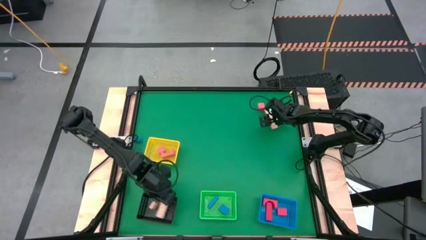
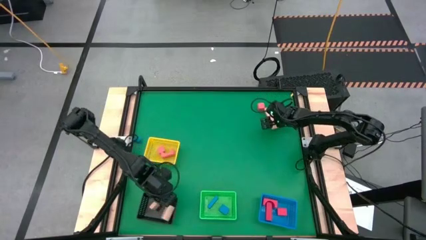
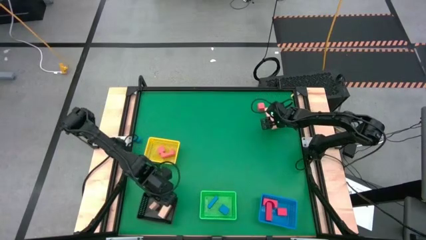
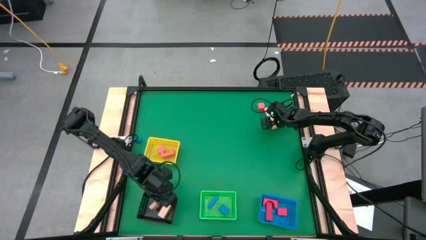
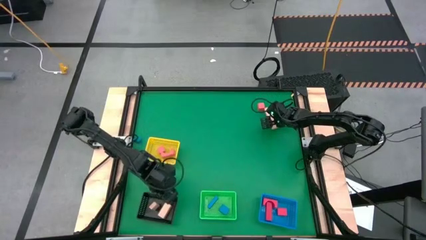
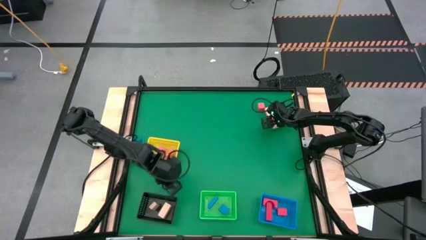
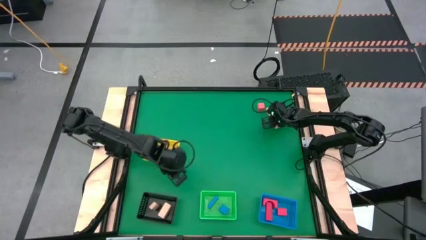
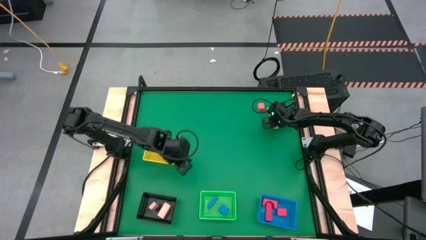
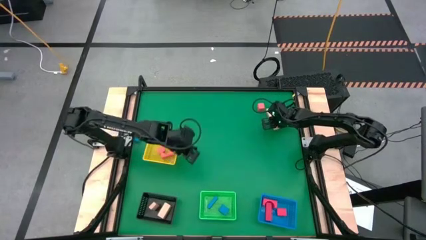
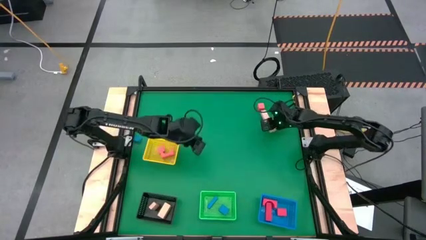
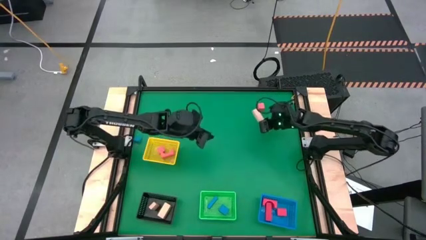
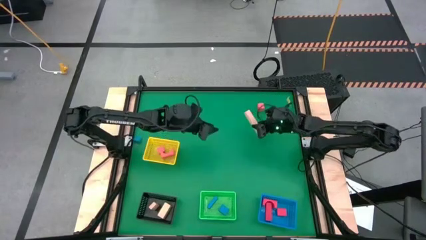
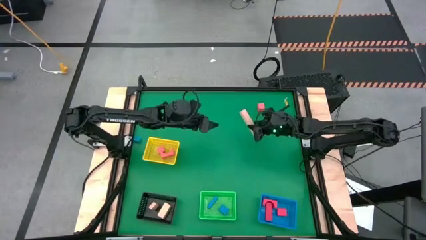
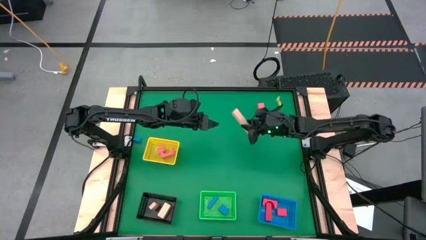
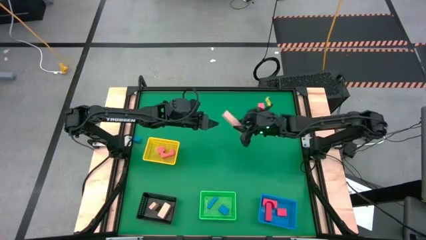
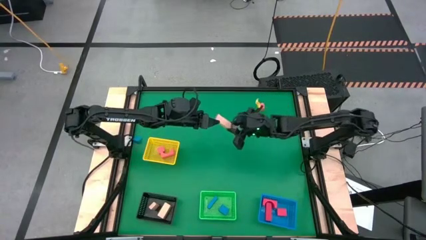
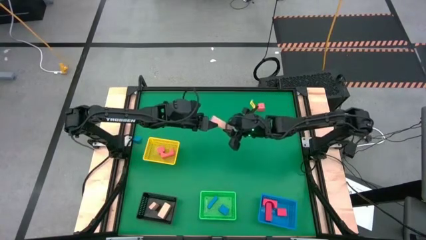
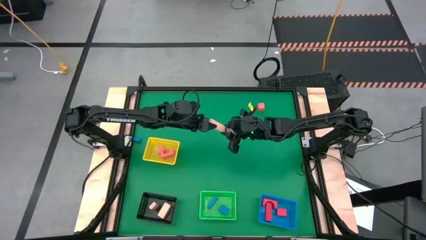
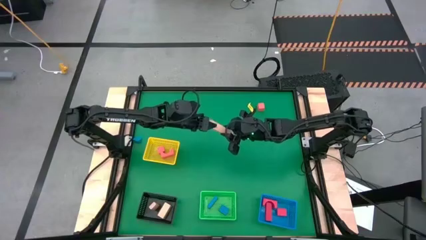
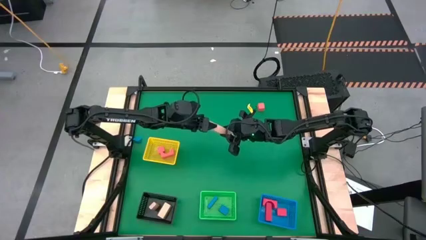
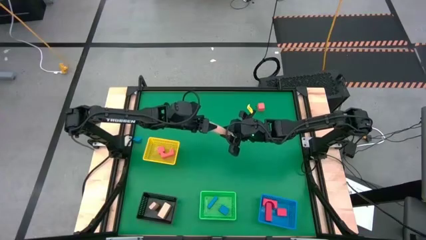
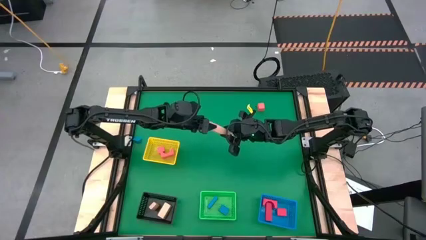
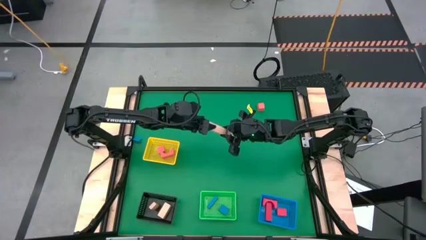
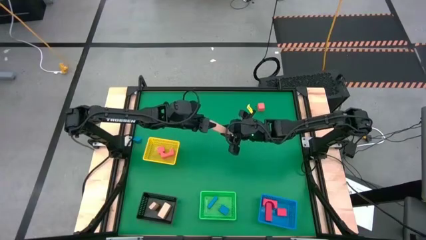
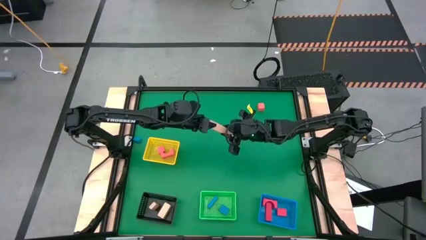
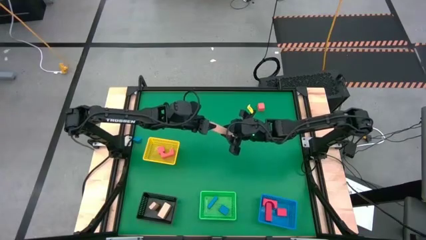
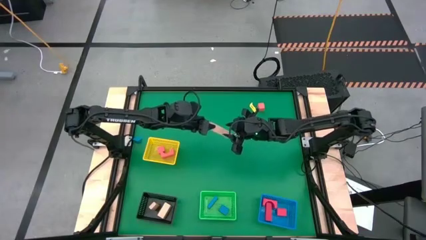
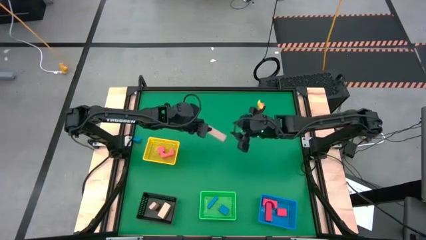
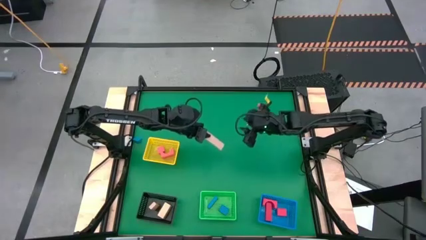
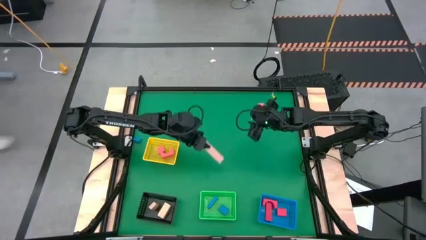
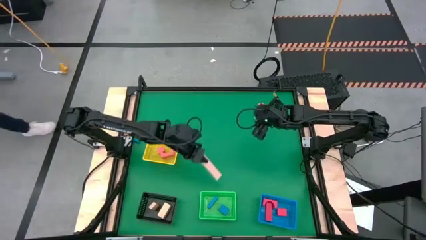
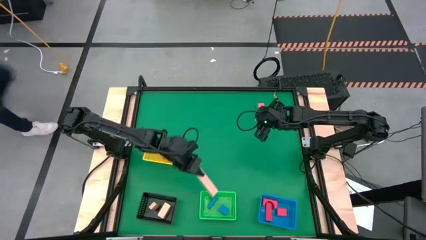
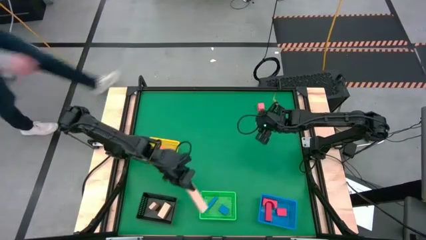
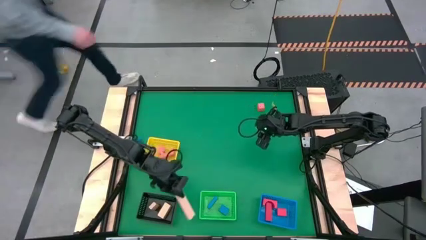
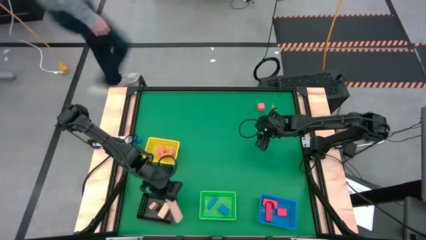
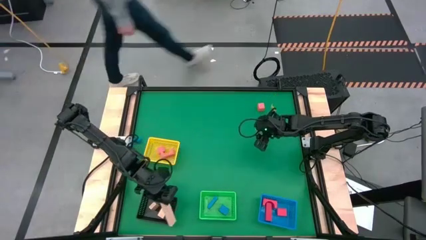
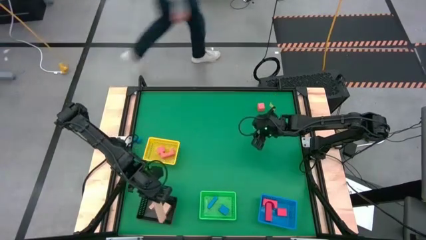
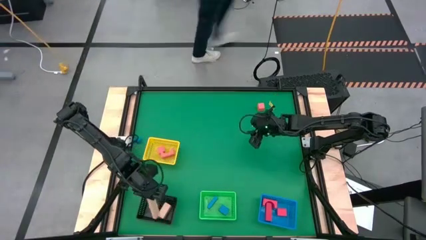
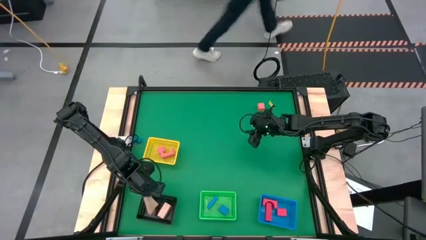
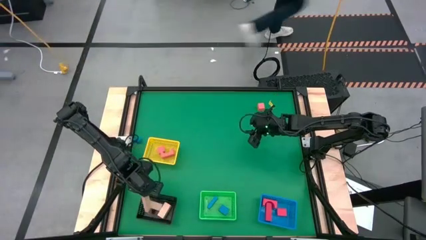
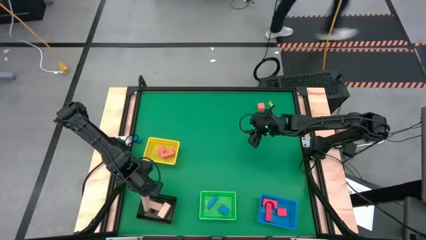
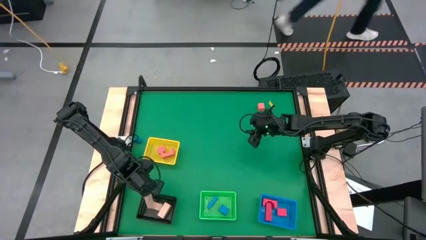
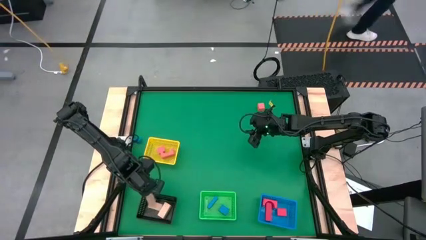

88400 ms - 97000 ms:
Task: Sort & place blocks by color
Put the large white rectangular block into the black bin

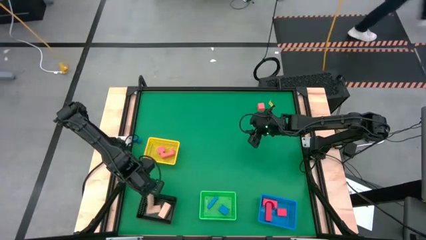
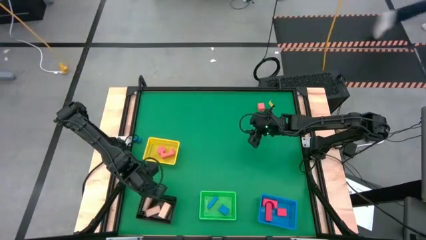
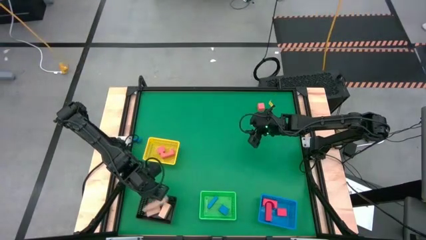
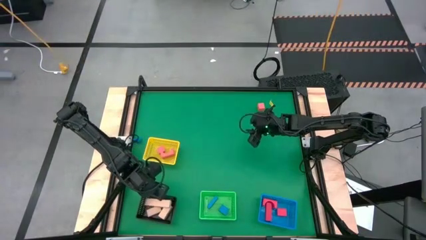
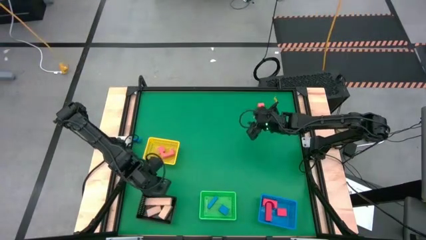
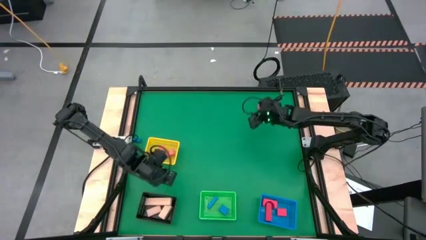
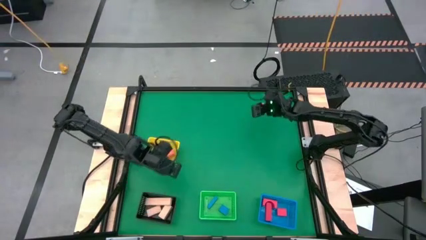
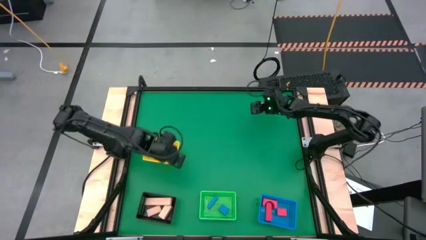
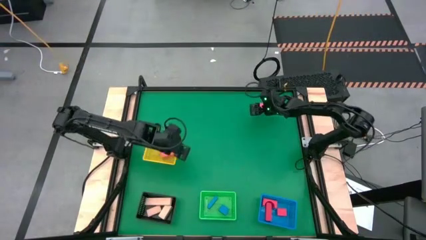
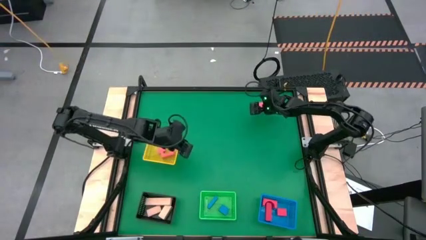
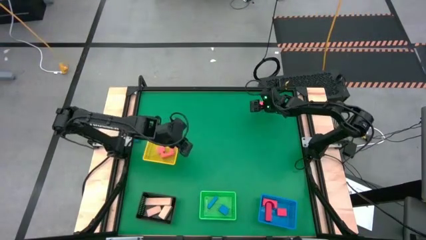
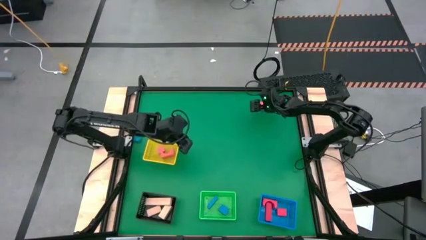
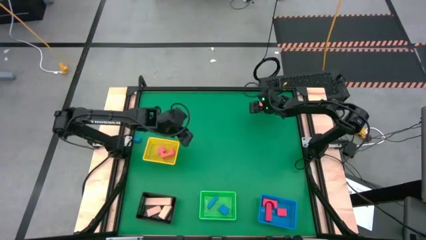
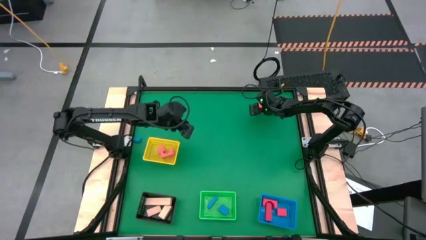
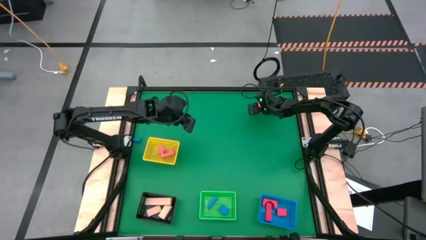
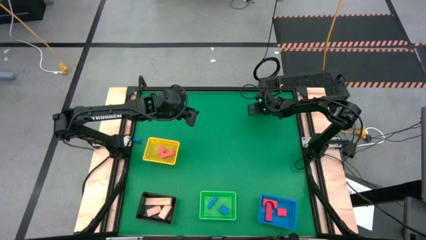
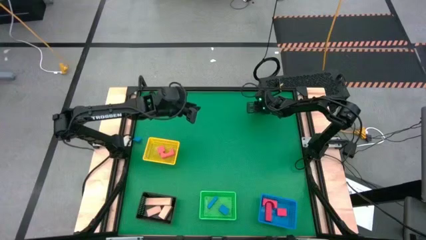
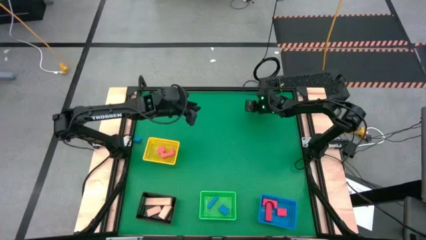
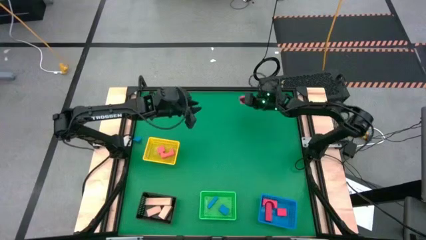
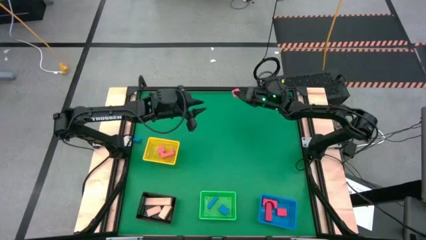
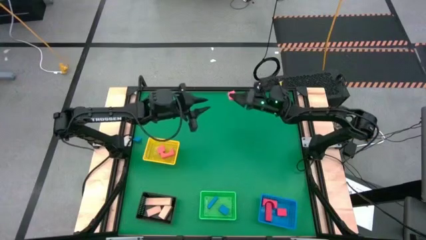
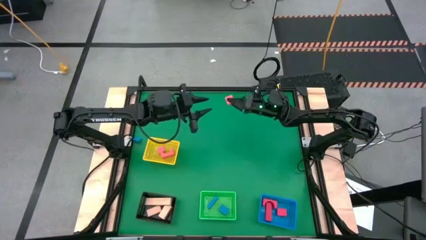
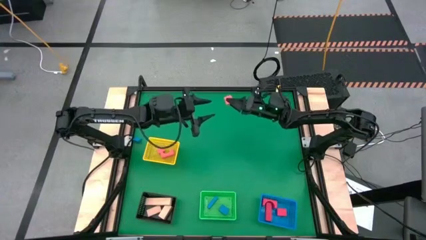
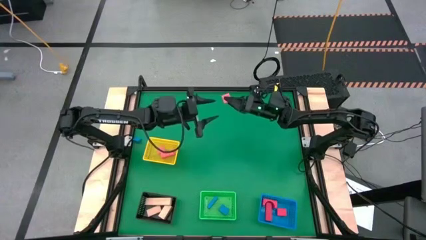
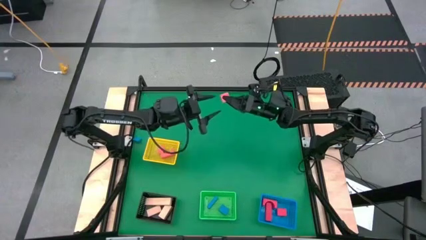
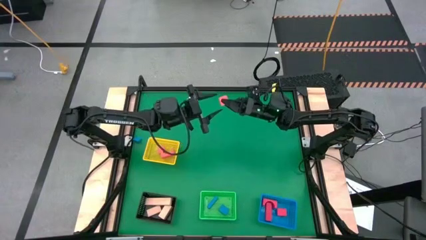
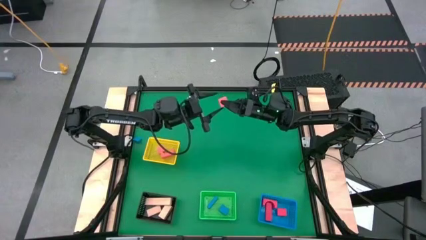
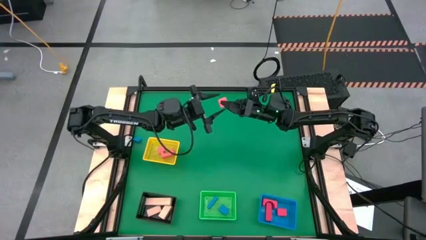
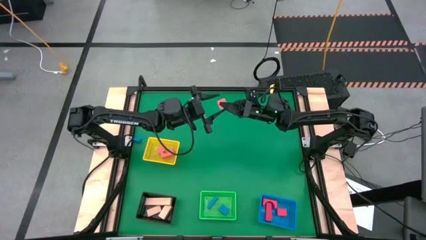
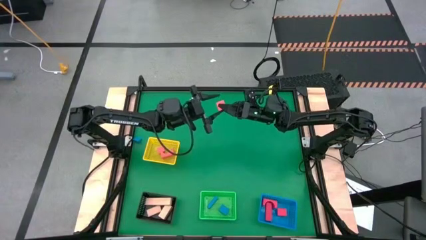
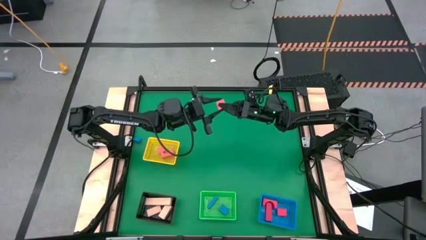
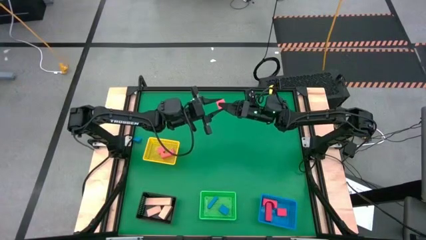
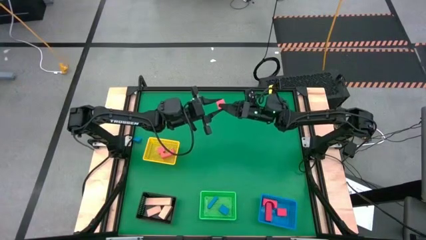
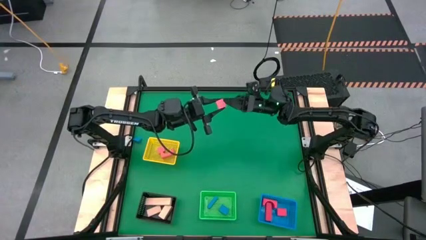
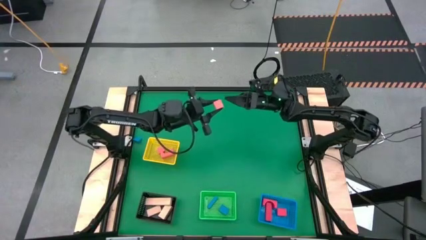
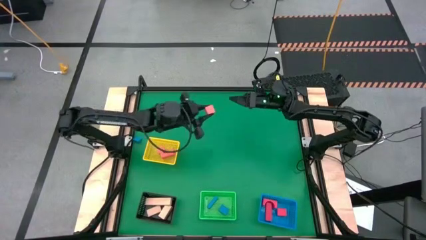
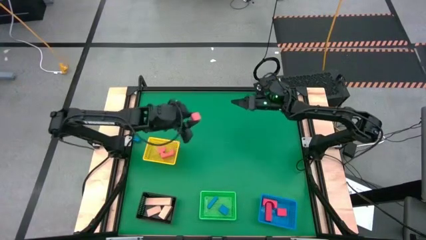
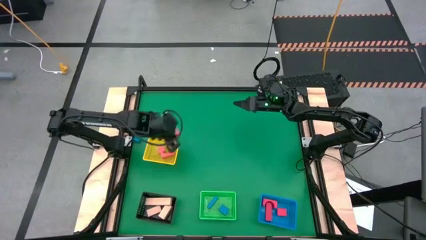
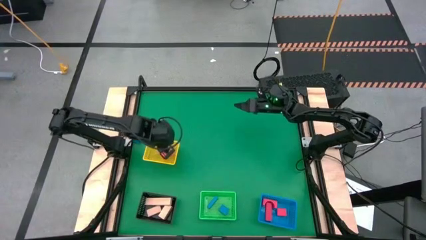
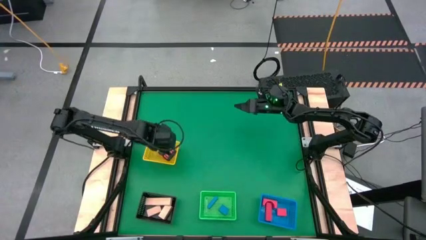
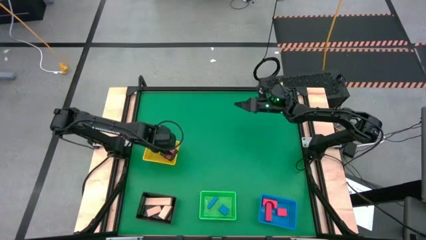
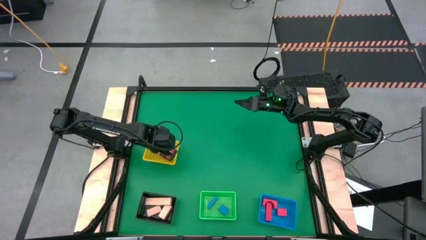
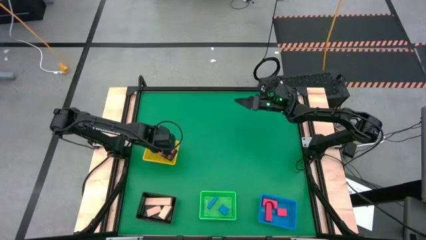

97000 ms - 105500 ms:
Put the orange cube block into the yellow bin
